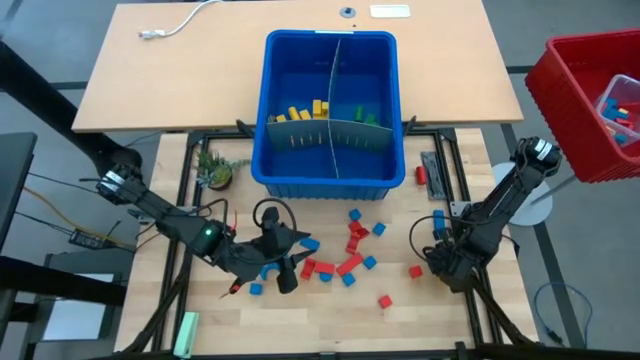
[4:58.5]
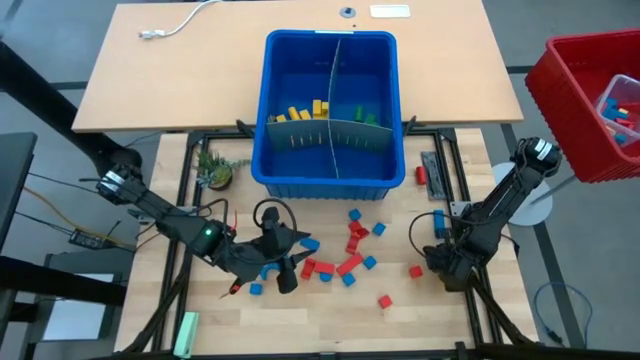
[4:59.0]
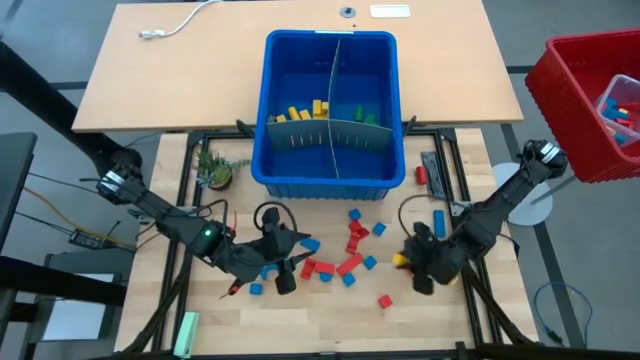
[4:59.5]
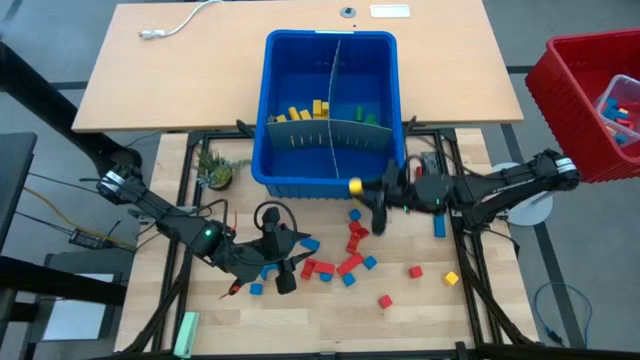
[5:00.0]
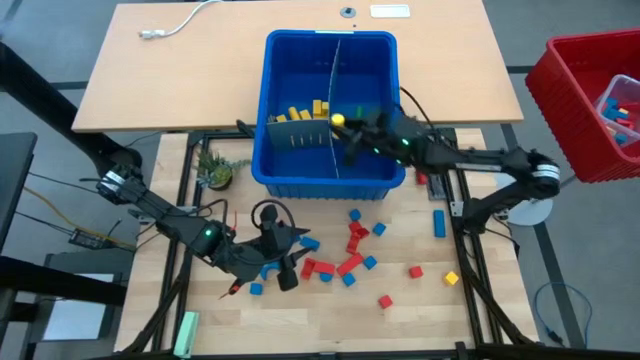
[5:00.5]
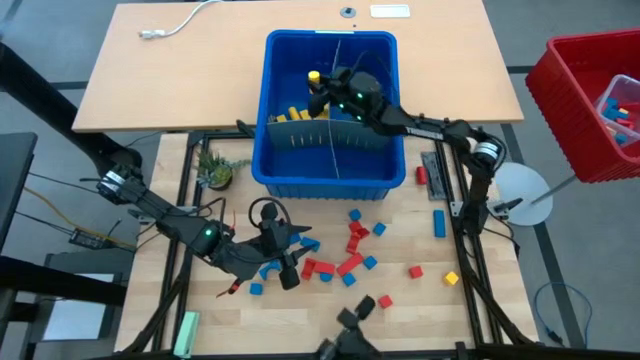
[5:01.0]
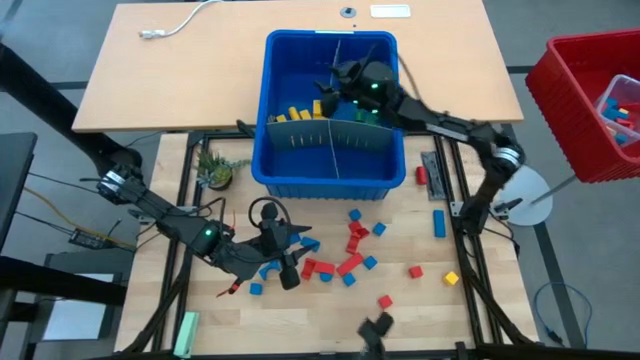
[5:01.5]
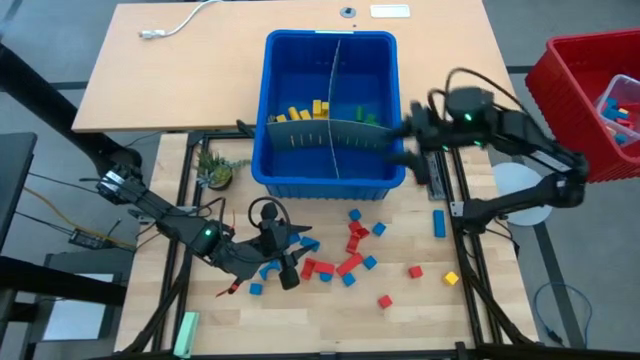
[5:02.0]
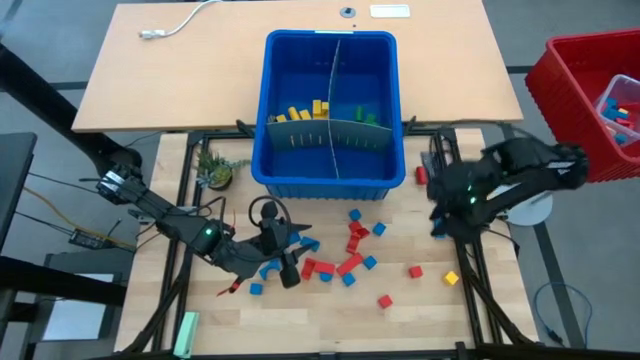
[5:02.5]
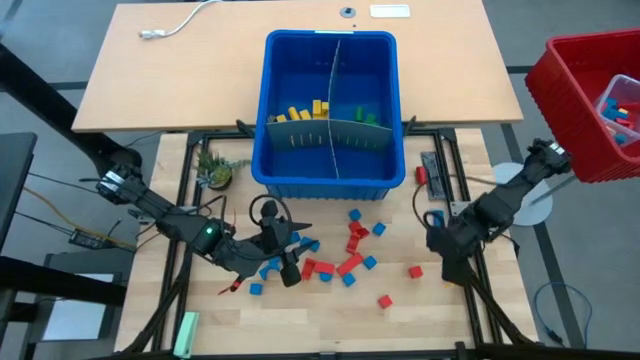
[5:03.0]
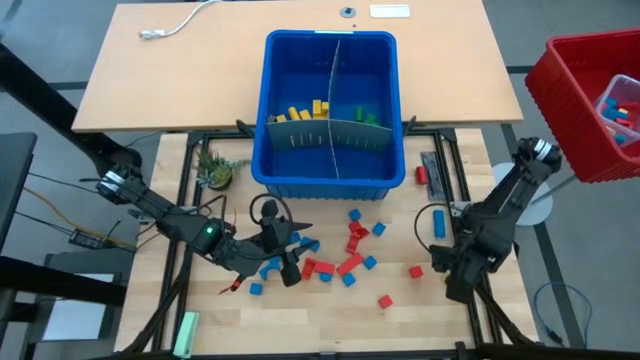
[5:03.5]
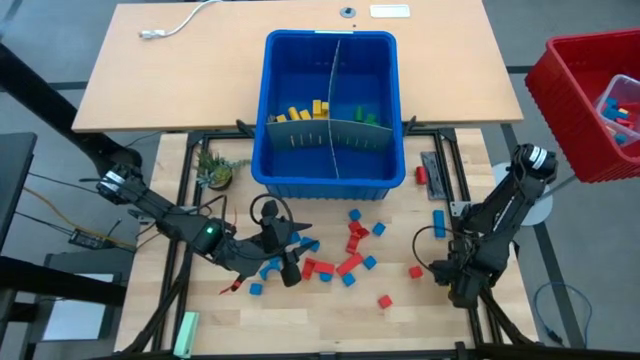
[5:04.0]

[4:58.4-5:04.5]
Task: Sort blocks
Put the yellow block with the other yellow blocks into the blue bin

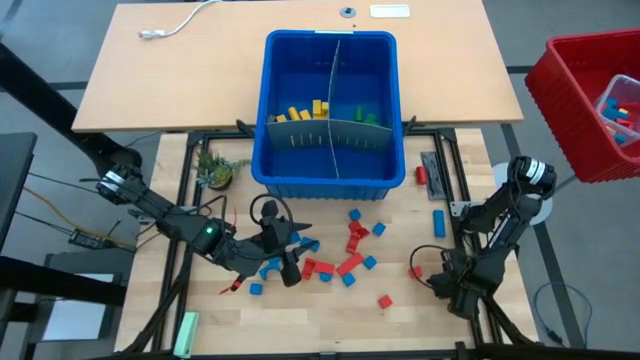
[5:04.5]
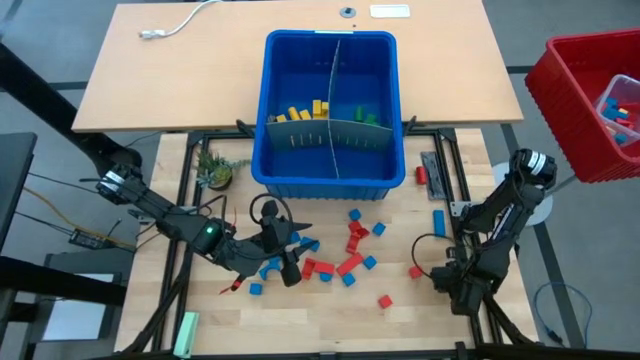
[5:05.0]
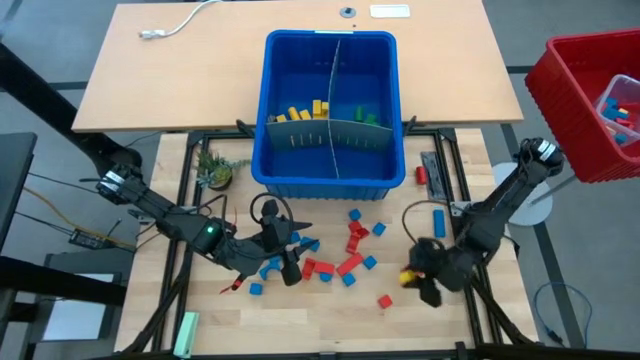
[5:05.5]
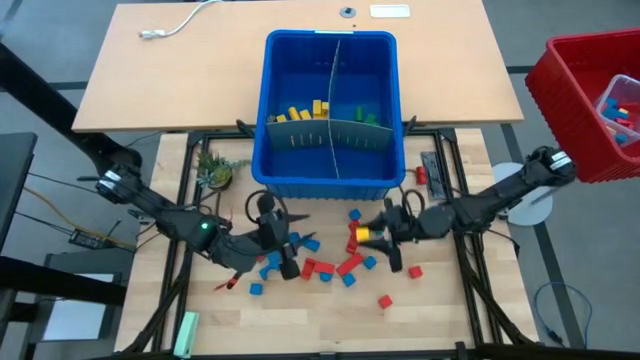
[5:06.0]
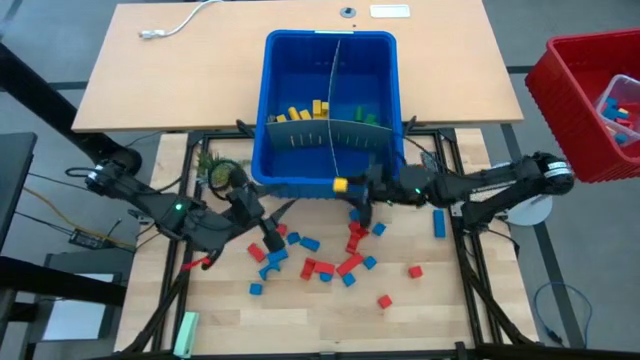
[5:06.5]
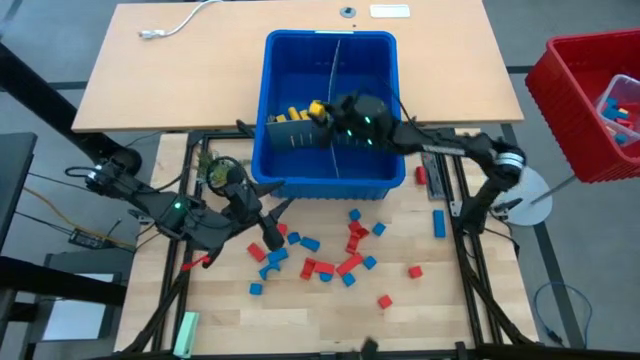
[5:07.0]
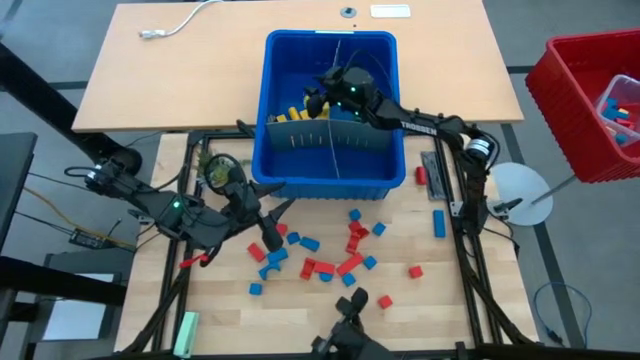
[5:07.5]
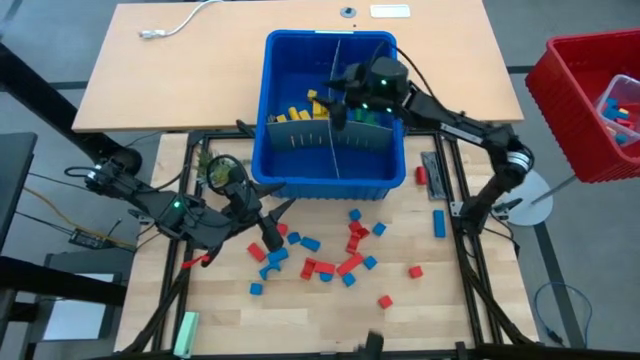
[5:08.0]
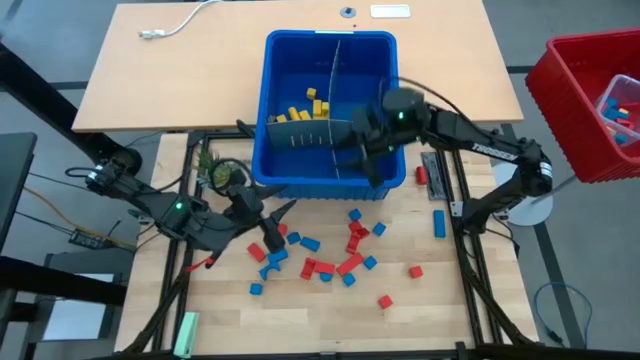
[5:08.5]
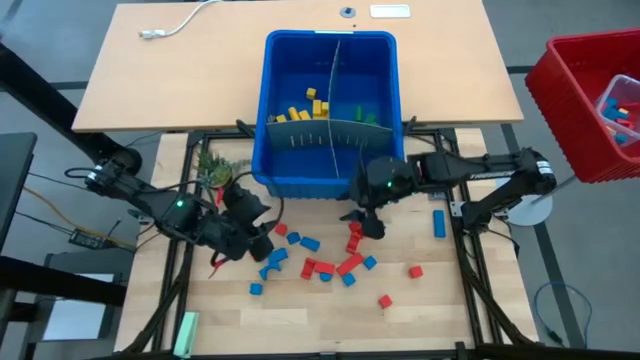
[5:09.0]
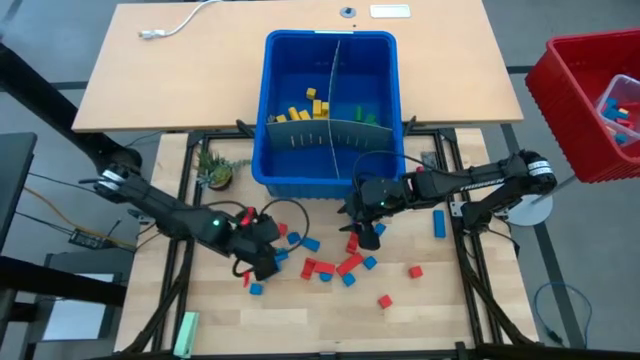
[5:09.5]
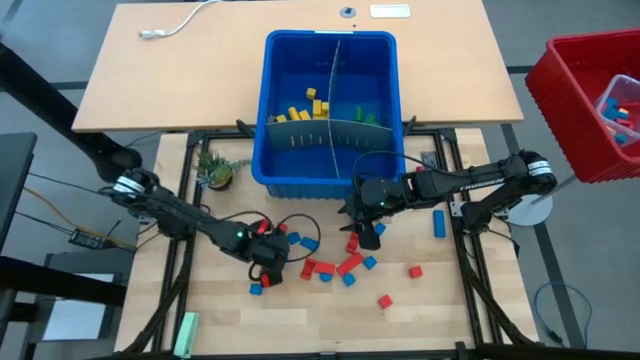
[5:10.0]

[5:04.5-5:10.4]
Put the yellow block with the other yellow blocks into the blue bin

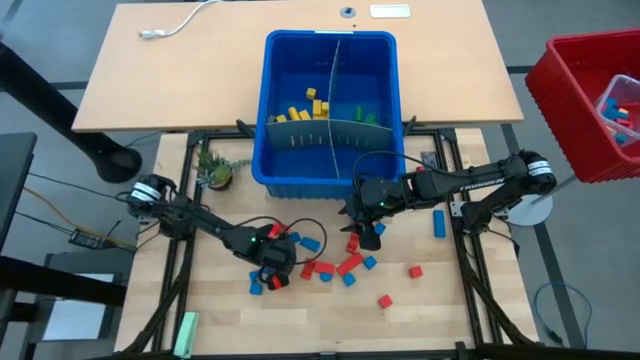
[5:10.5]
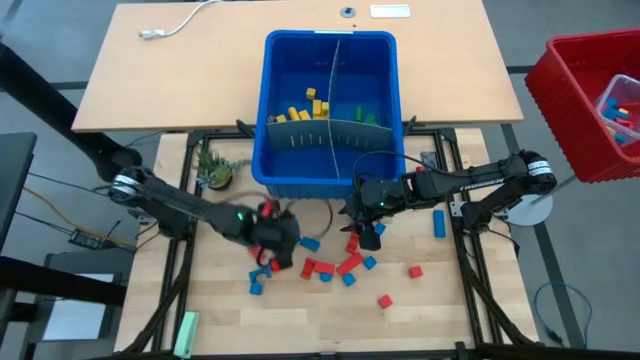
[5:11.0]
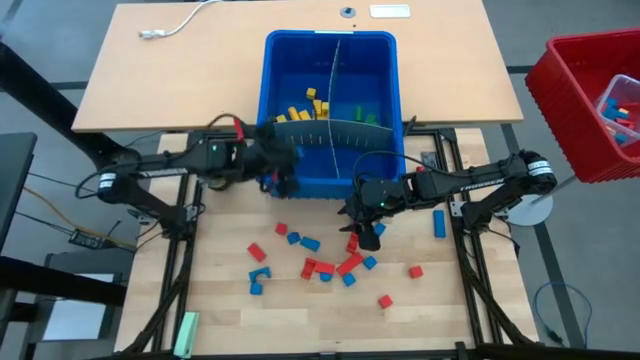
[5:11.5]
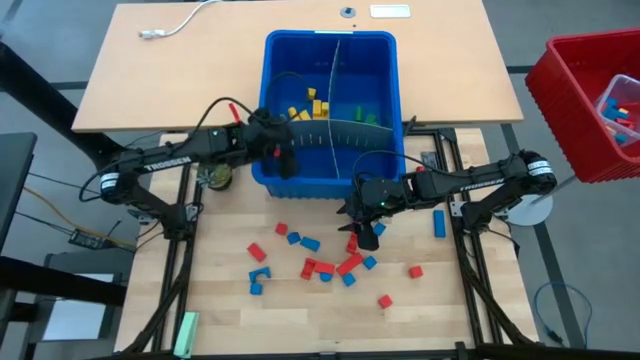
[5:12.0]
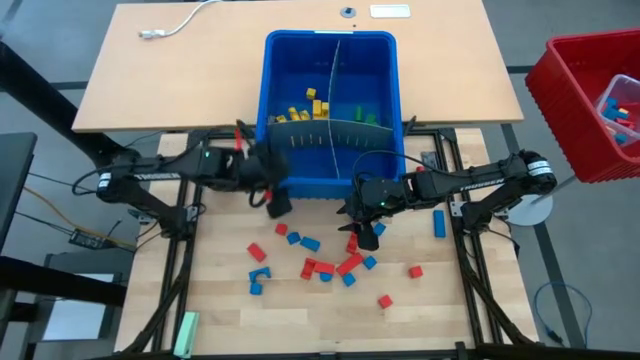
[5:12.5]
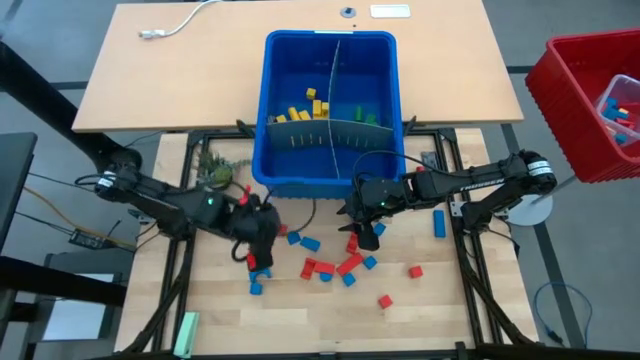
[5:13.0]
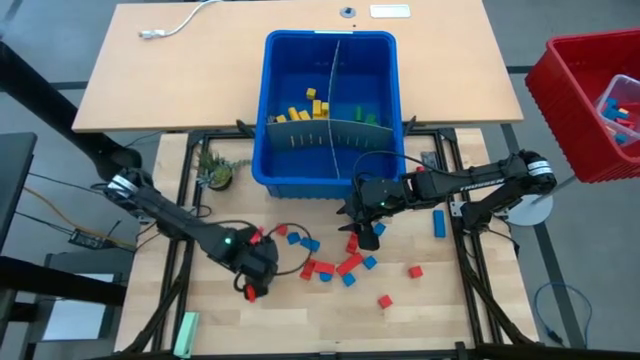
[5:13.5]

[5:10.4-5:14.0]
Put the blue block into the blue bin

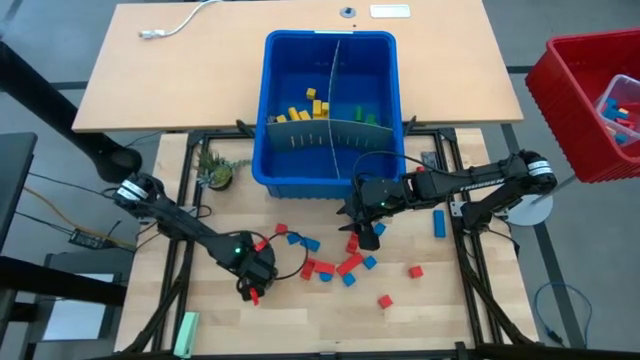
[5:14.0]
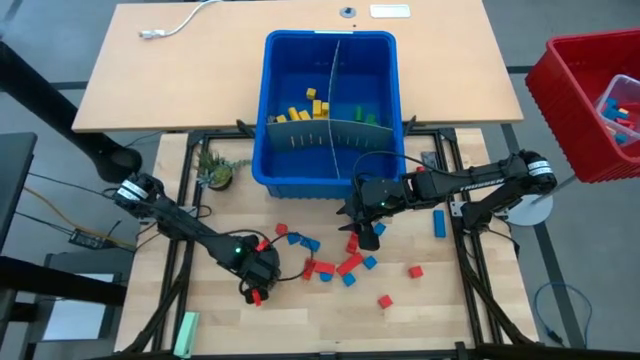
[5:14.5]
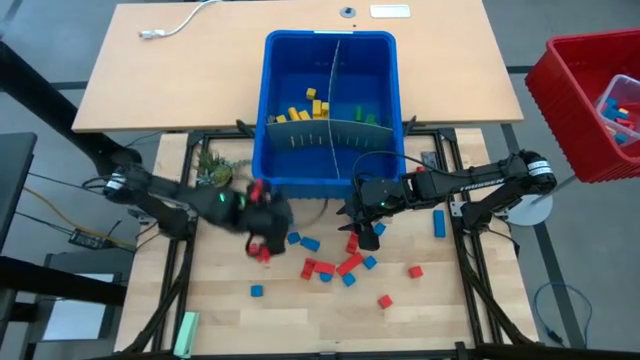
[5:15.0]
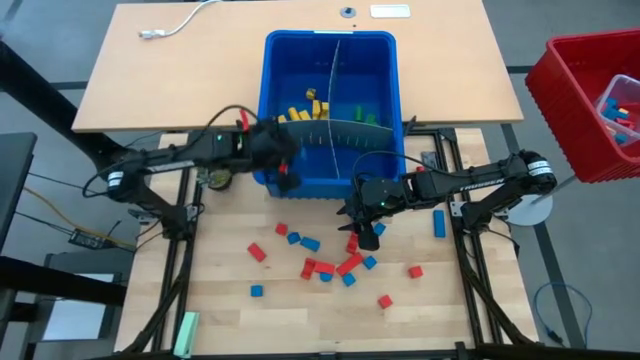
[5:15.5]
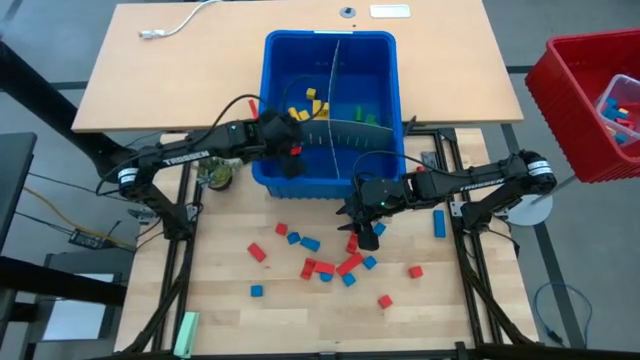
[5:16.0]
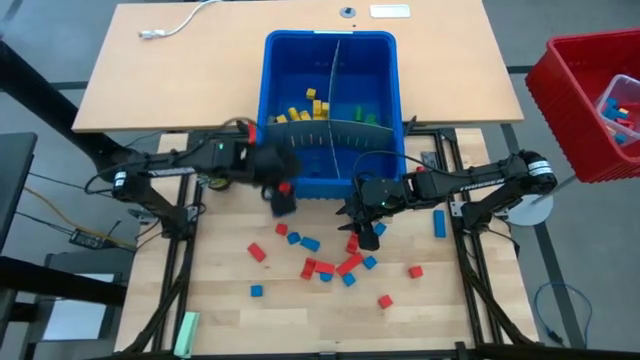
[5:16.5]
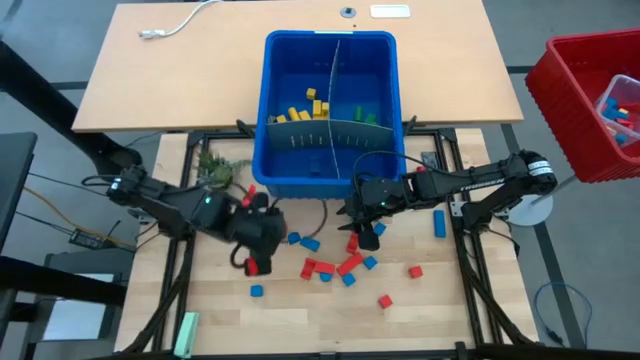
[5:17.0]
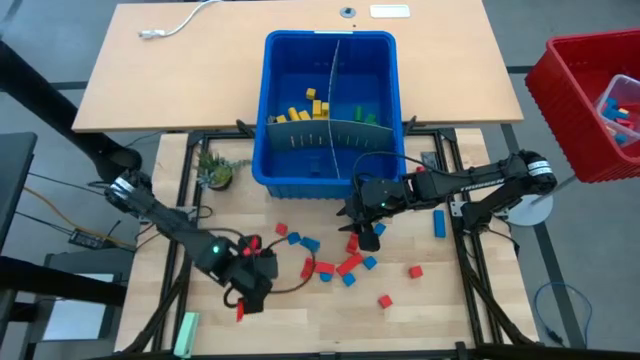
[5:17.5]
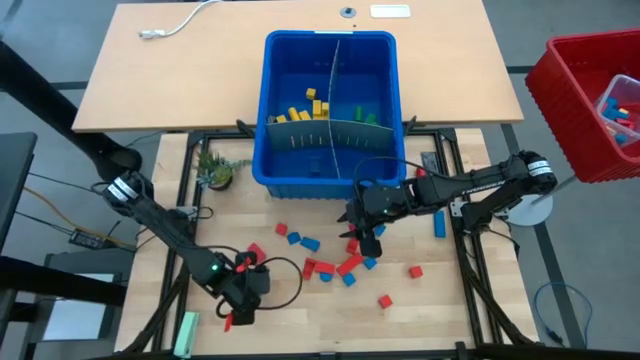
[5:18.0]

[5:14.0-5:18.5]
Put the blue block with the other blue block into the blue bin
